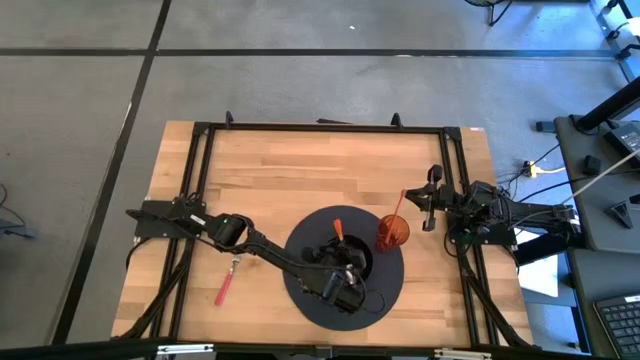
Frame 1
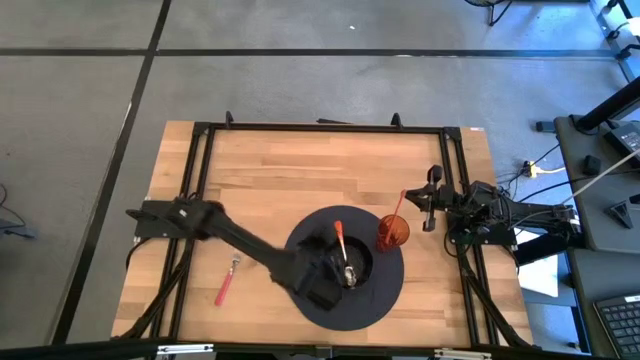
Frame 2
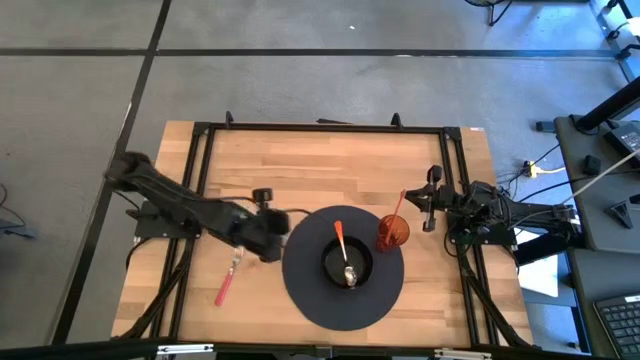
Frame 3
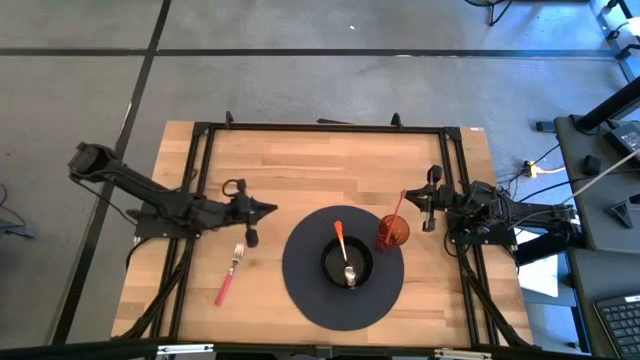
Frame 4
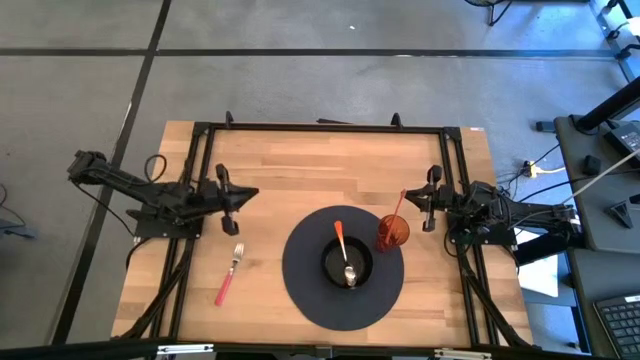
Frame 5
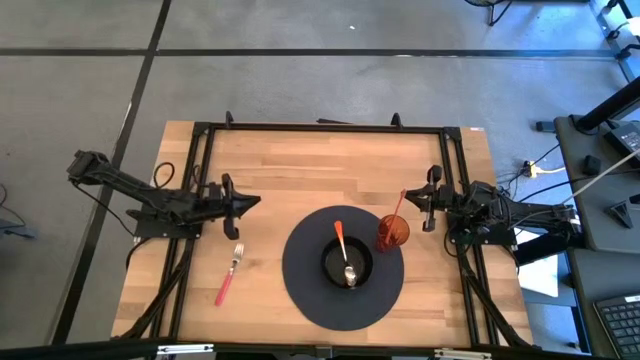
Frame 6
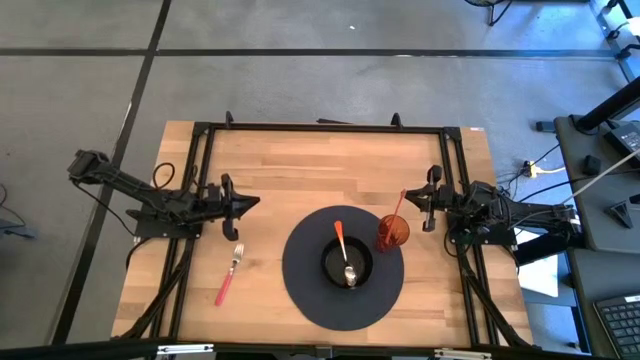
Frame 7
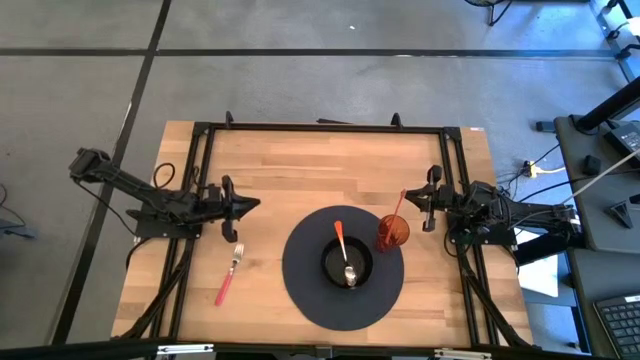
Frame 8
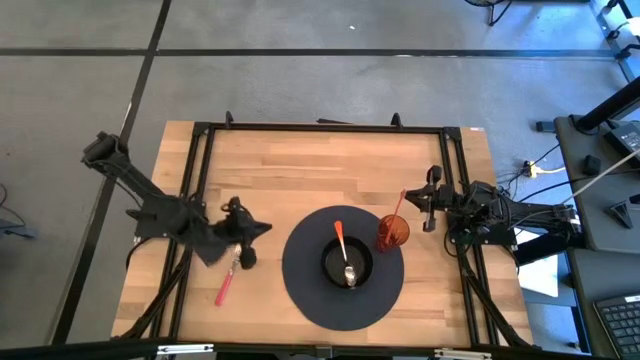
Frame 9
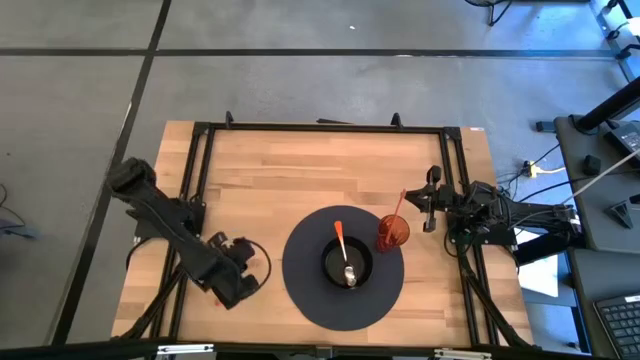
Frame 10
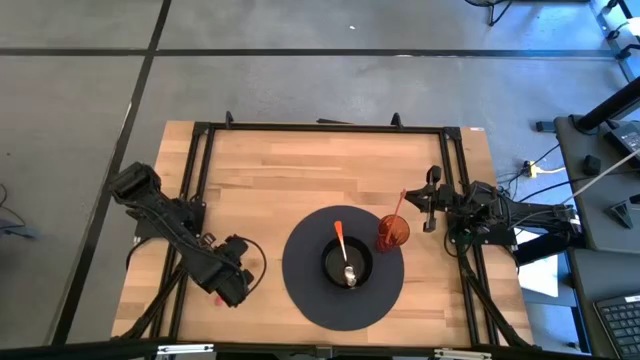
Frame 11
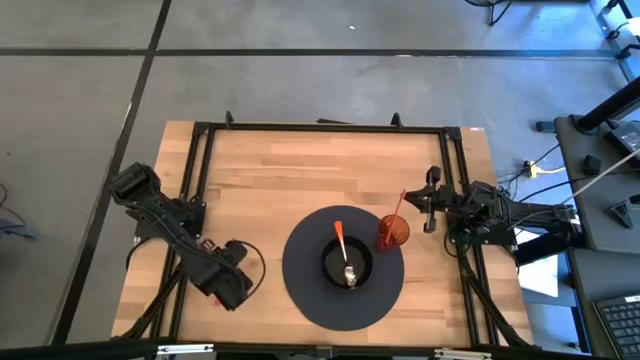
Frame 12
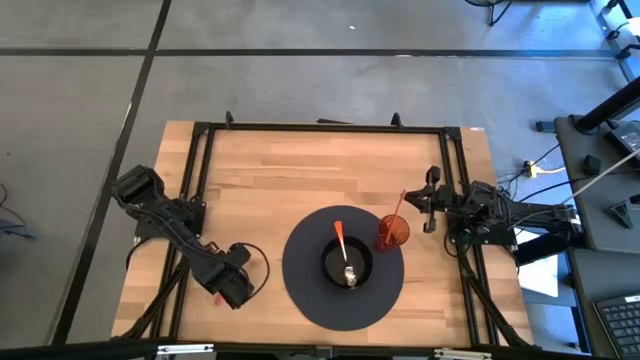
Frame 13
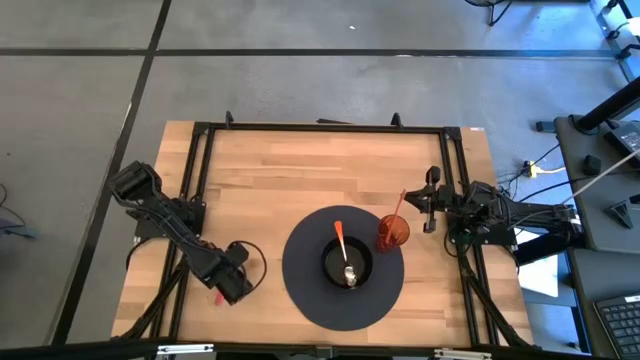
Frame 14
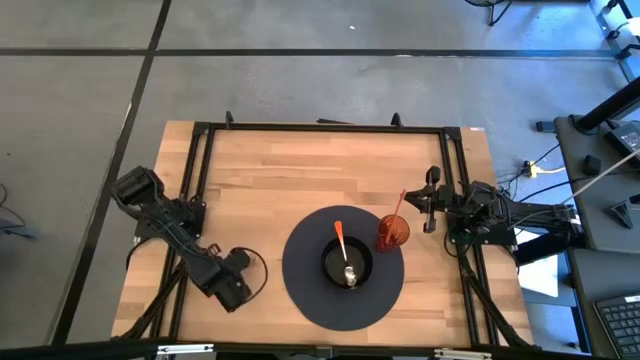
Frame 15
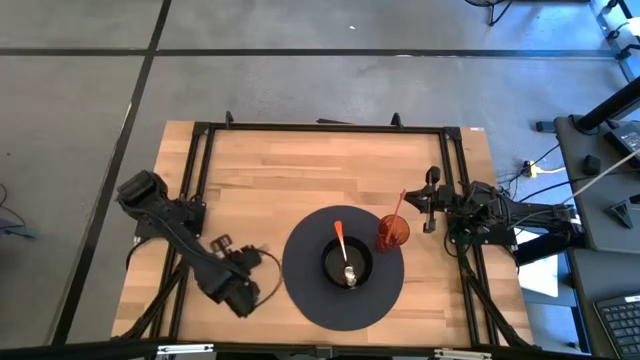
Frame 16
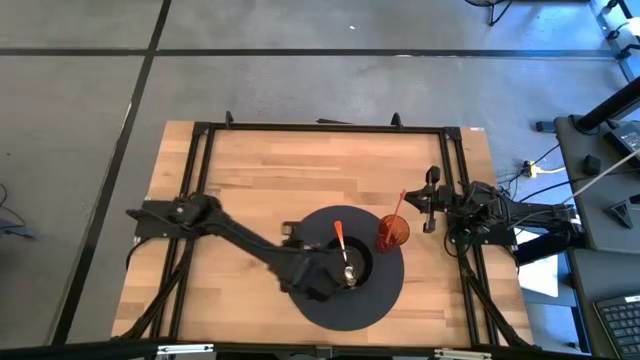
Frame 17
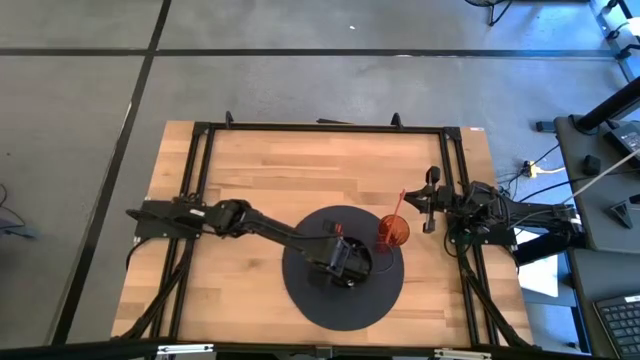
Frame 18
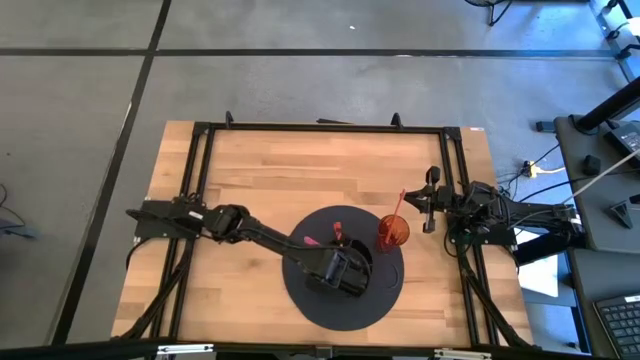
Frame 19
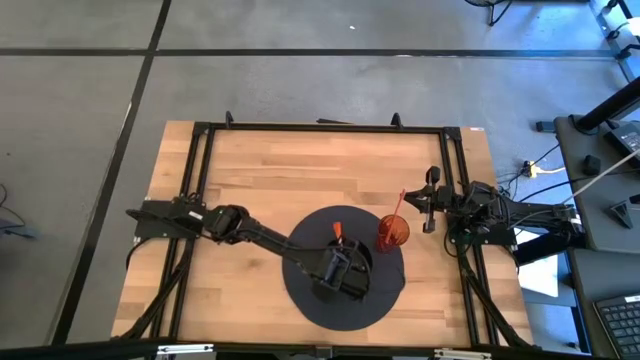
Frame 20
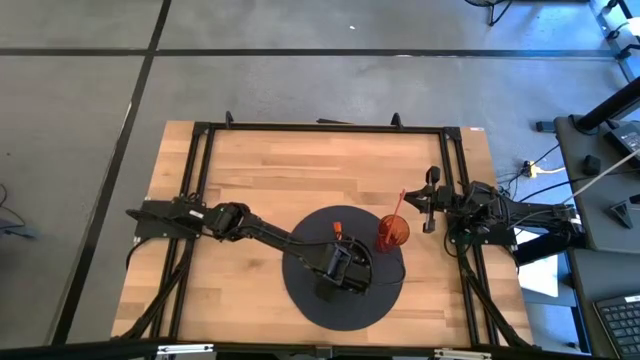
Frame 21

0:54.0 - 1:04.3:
Task: Pick & Place Utensil
Put the pink fork into the black bowl

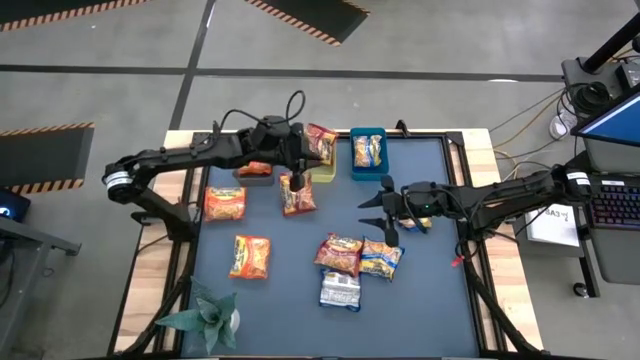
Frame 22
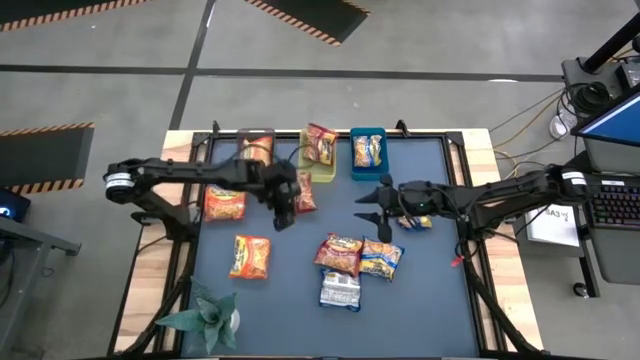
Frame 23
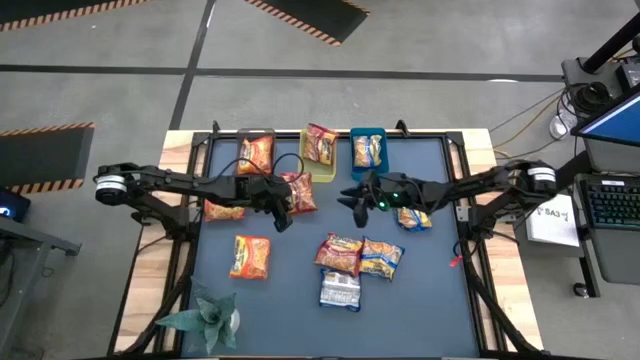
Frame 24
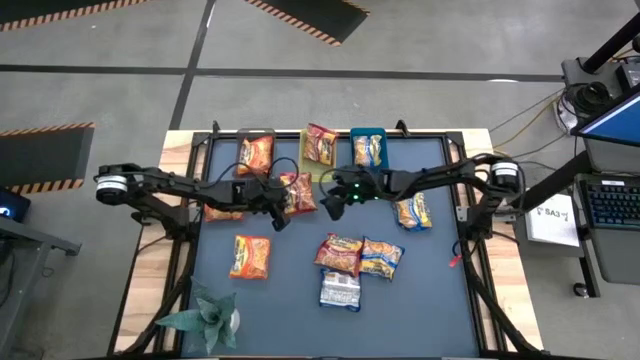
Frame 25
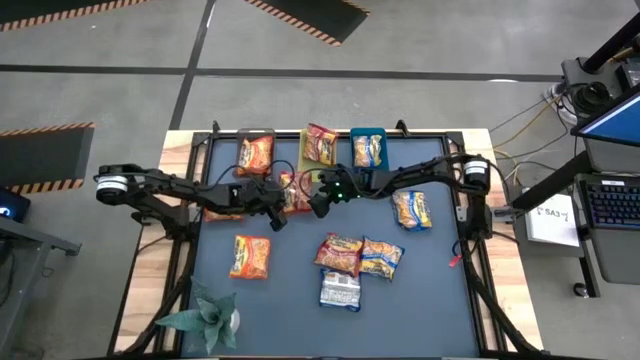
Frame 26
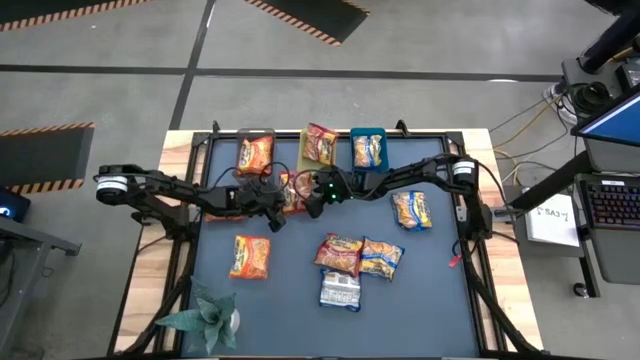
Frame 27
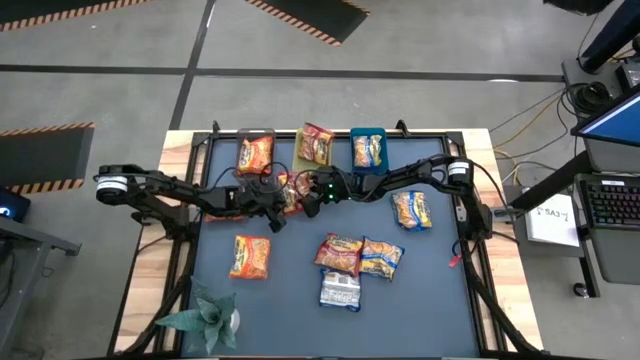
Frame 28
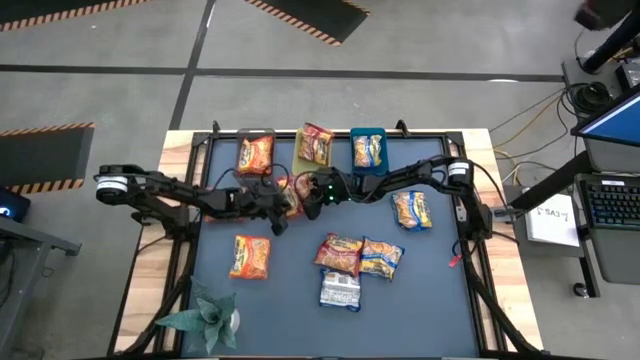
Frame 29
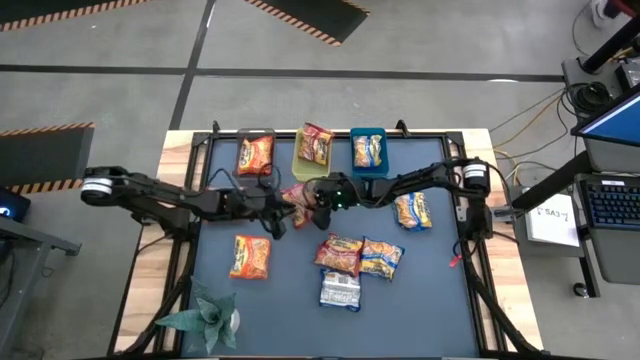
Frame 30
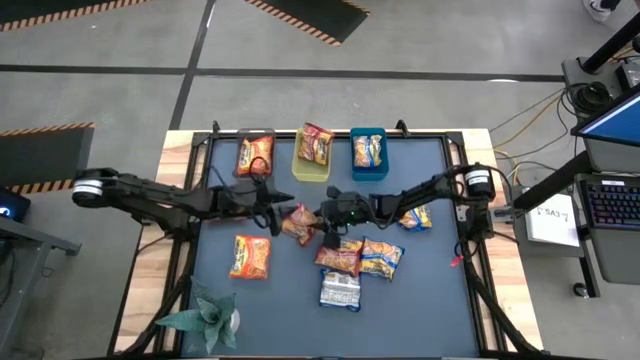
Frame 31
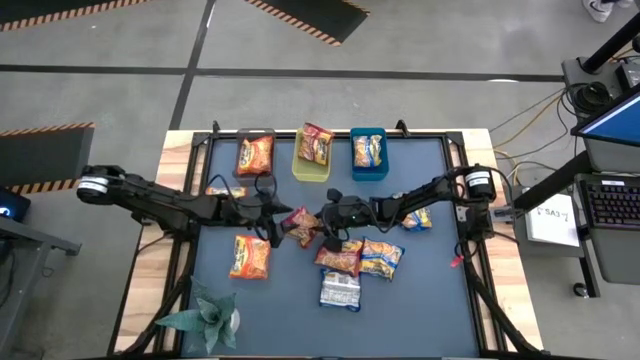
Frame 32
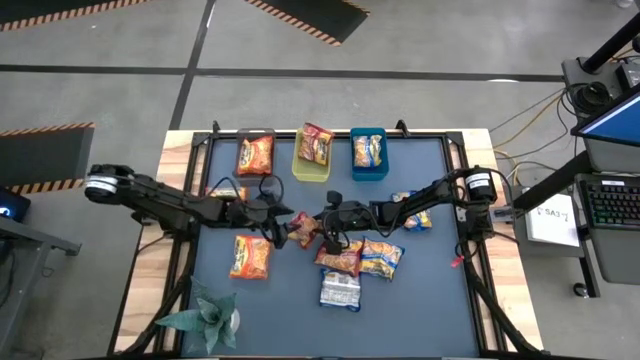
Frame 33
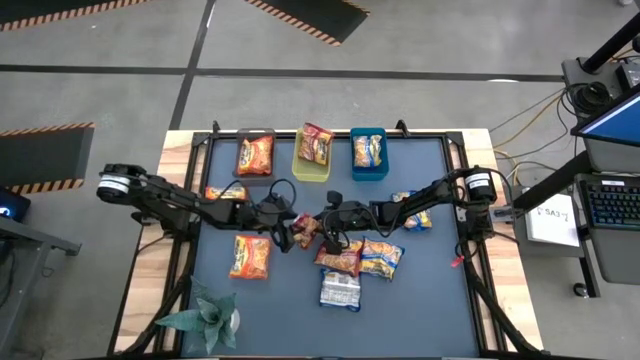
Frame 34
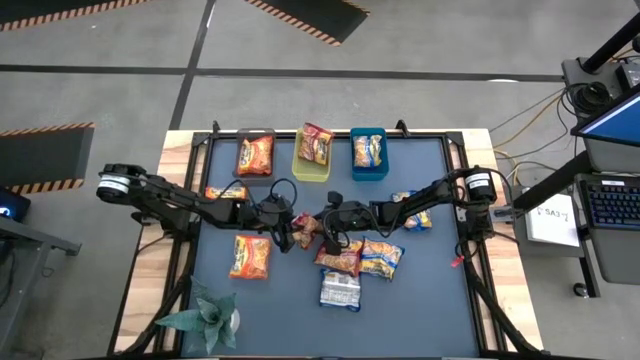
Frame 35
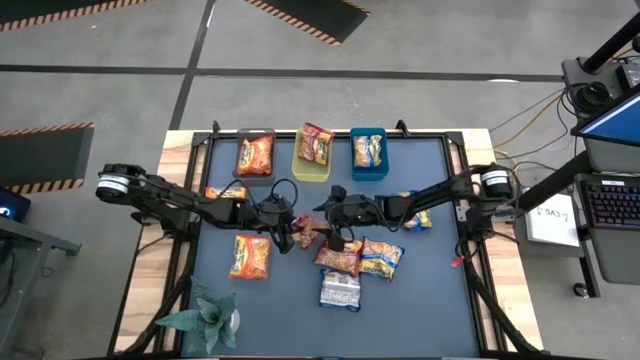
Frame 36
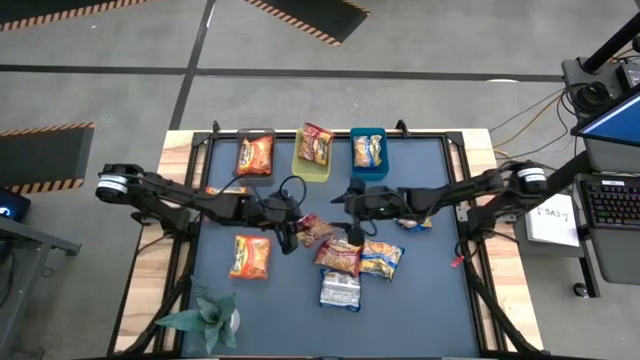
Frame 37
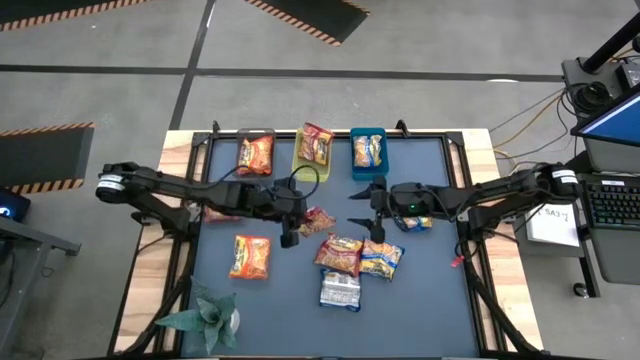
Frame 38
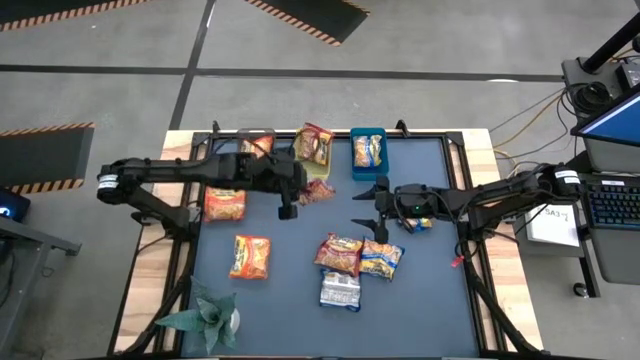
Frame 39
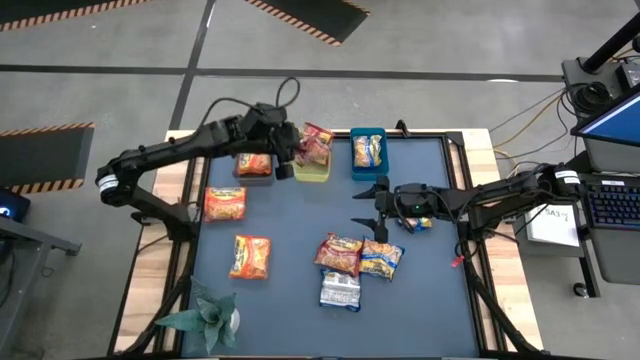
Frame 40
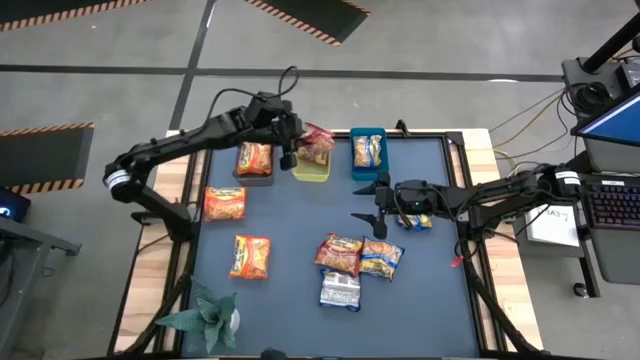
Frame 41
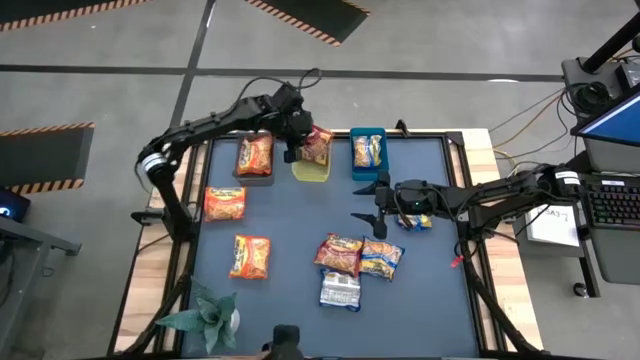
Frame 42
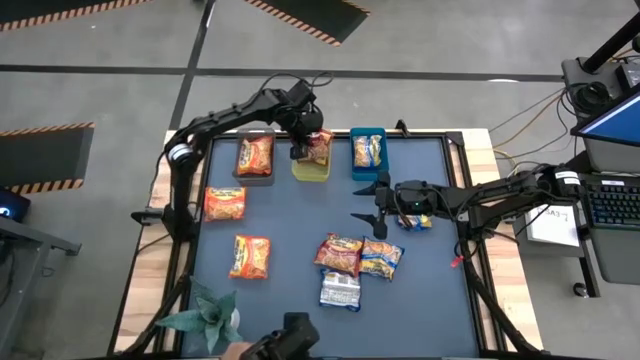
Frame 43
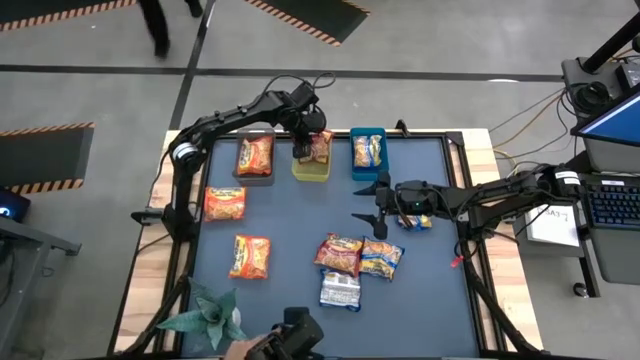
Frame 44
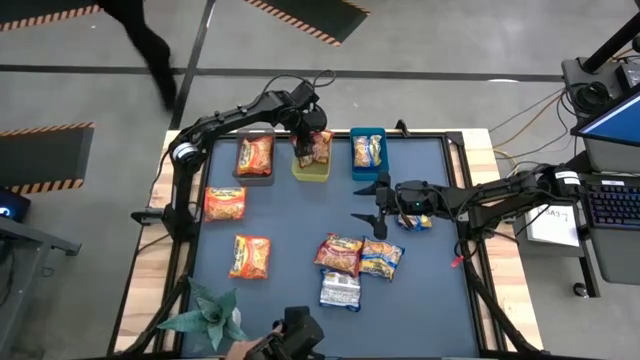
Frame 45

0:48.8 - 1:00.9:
Task: Sort Maruchan noodles
Put the red noodle pack into the yellow bin
